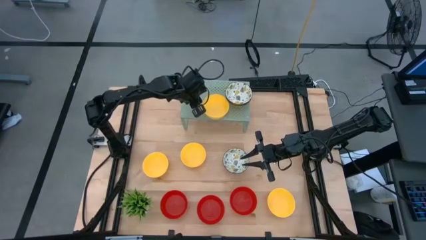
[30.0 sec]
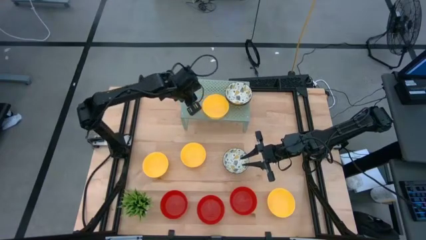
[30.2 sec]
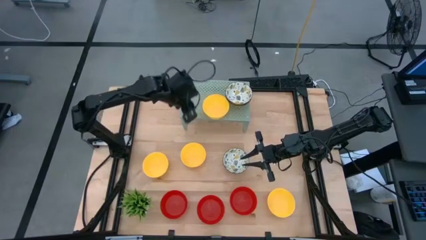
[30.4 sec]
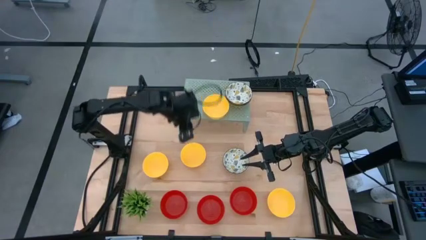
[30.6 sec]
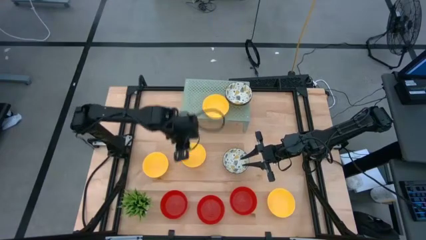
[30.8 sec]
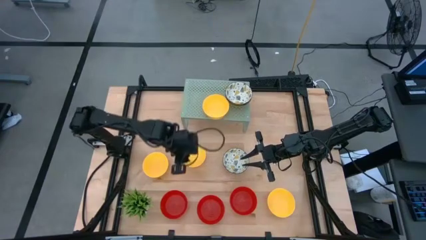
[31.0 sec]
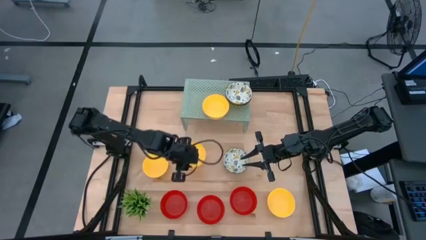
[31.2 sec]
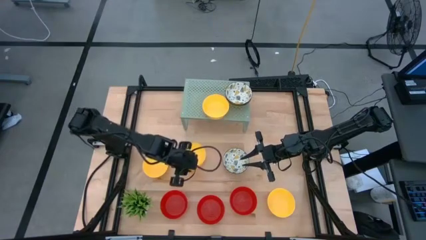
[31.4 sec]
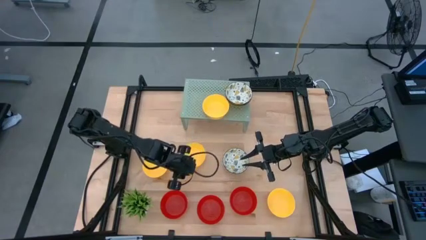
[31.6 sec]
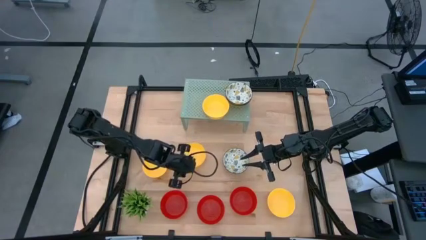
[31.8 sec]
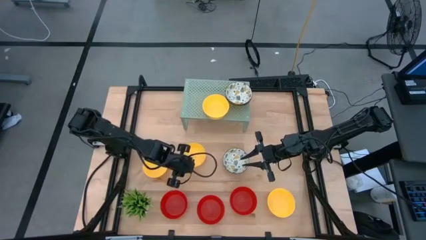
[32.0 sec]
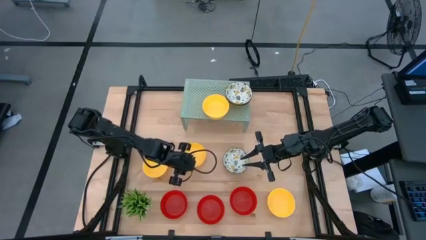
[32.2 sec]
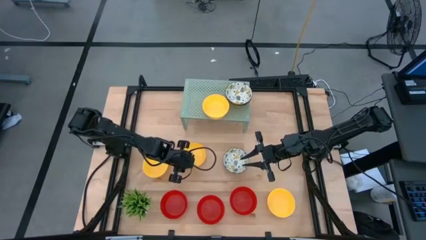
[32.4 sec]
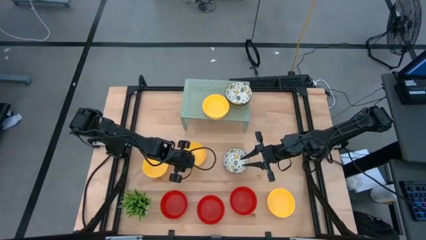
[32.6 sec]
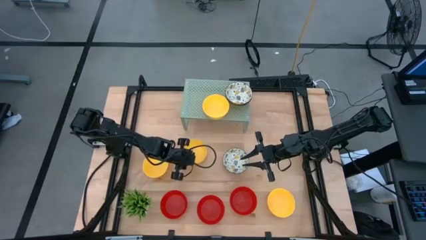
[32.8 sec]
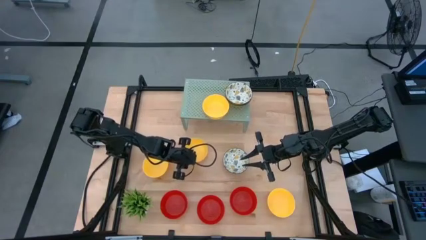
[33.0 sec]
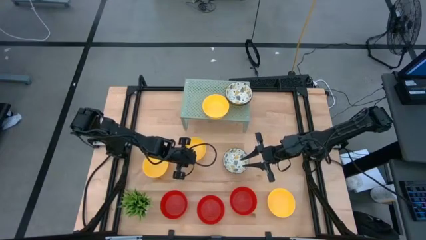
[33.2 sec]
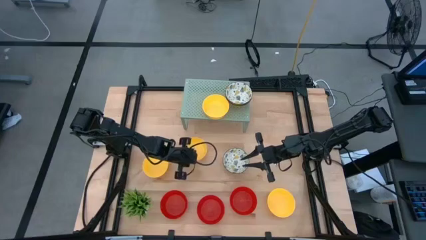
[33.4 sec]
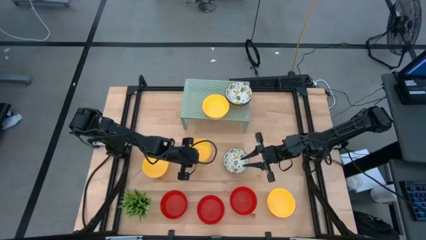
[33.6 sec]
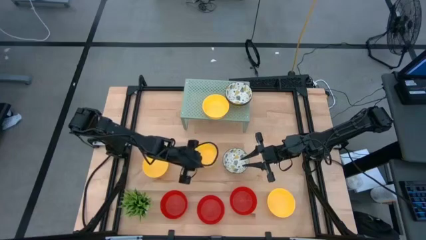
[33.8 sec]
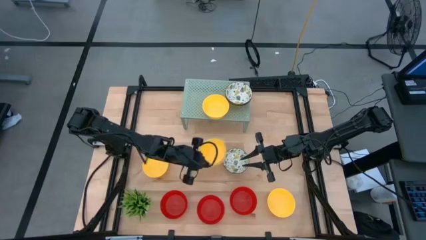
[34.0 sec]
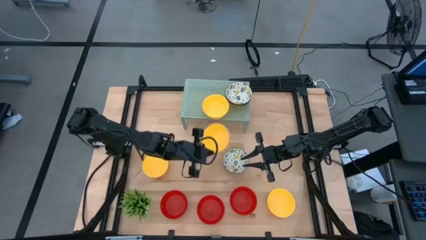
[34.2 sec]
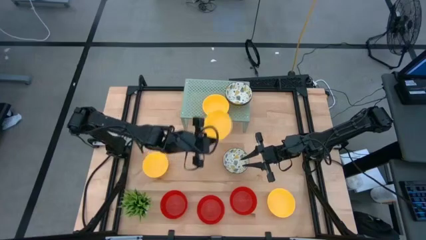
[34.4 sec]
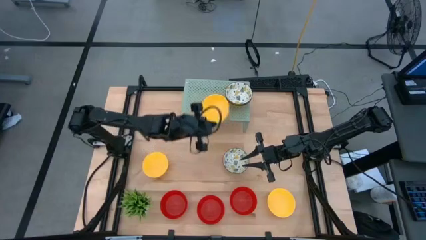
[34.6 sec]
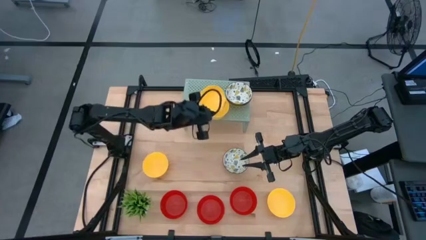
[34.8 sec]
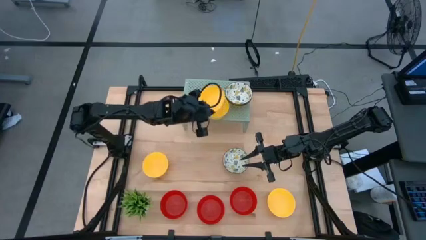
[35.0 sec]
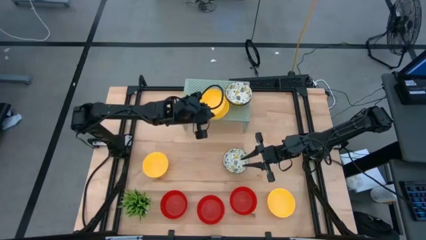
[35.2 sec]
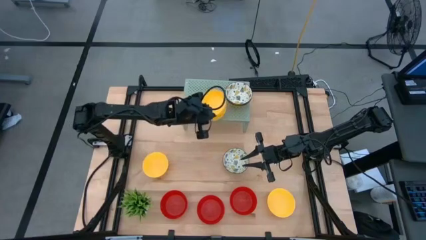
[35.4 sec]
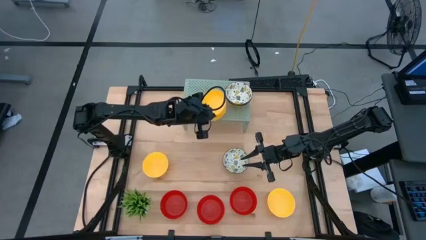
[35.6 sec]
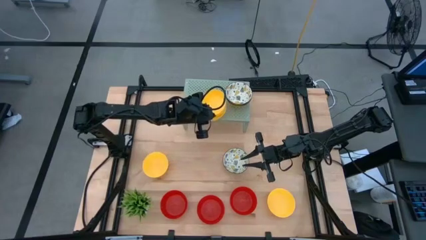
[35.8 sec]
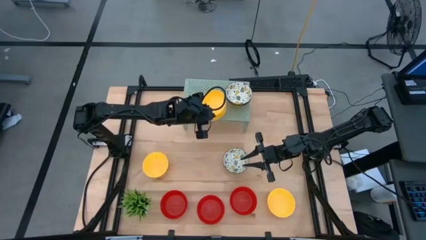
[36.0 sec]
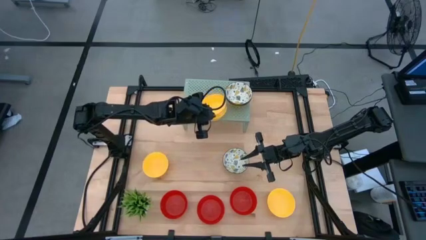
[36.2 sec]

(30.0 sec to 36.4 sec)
Task: Pick & Place Mini bowls
Stack the yellow bowl on the yellow bowl on the shelf

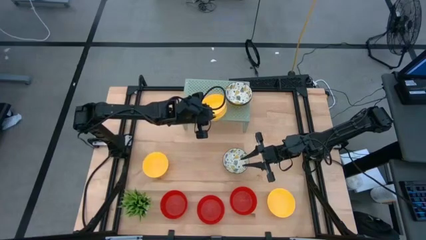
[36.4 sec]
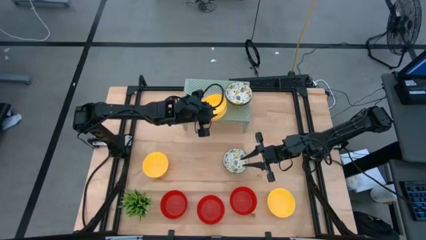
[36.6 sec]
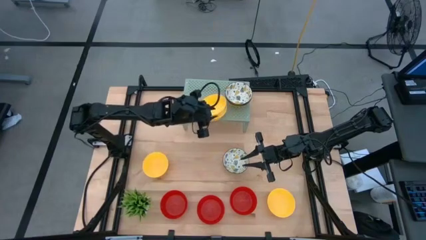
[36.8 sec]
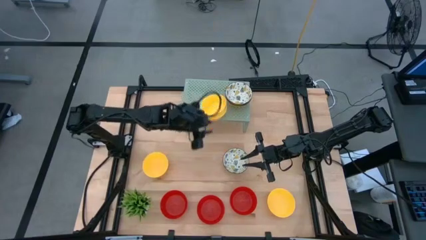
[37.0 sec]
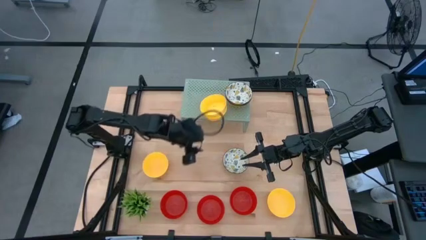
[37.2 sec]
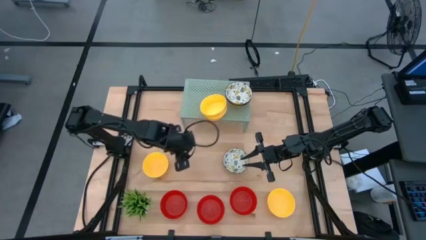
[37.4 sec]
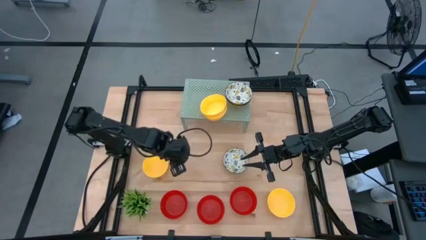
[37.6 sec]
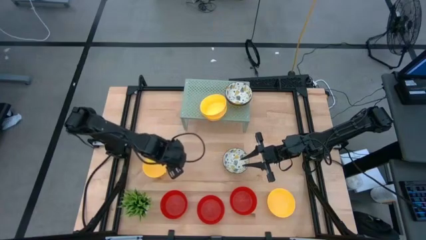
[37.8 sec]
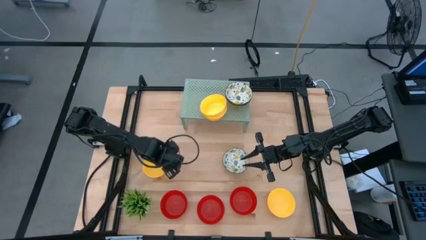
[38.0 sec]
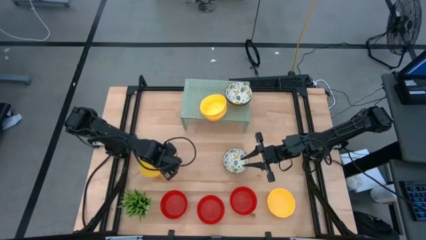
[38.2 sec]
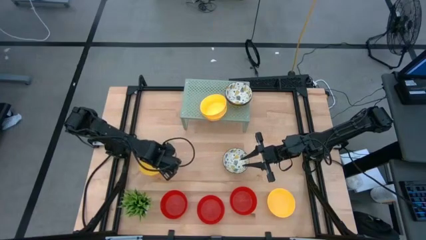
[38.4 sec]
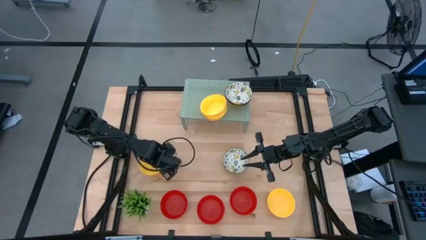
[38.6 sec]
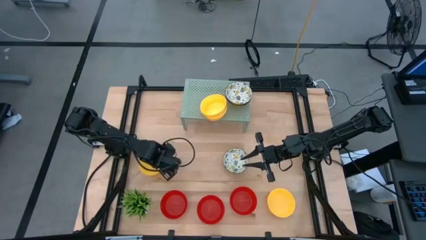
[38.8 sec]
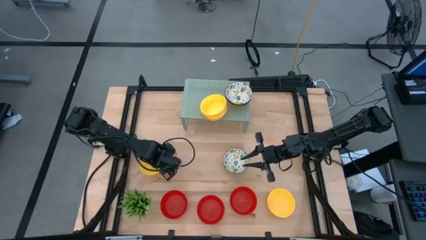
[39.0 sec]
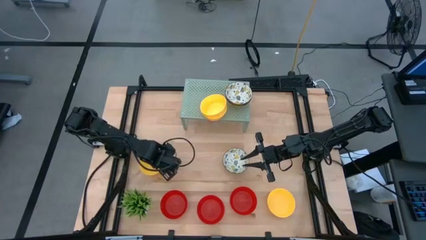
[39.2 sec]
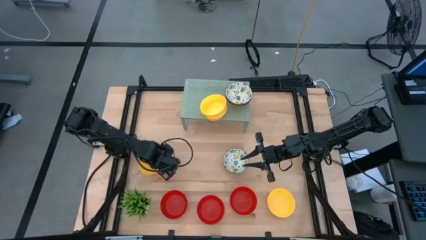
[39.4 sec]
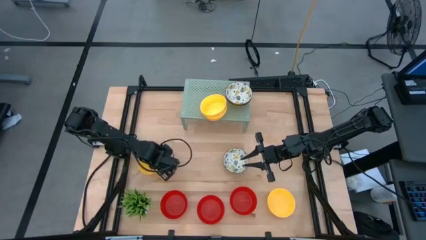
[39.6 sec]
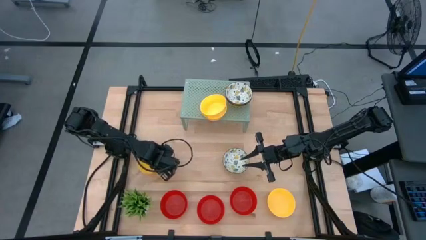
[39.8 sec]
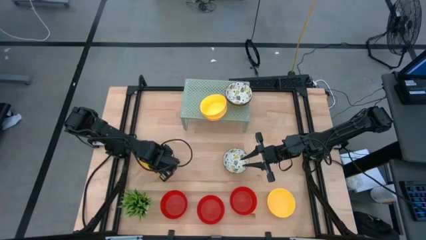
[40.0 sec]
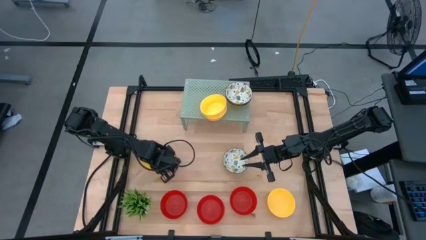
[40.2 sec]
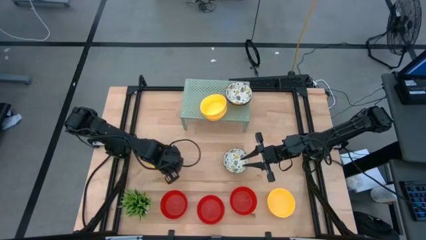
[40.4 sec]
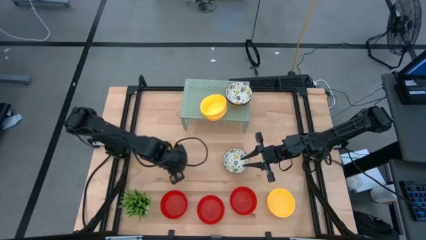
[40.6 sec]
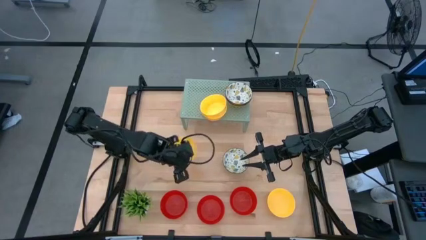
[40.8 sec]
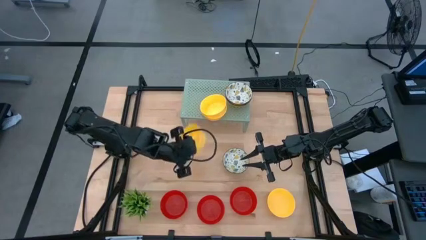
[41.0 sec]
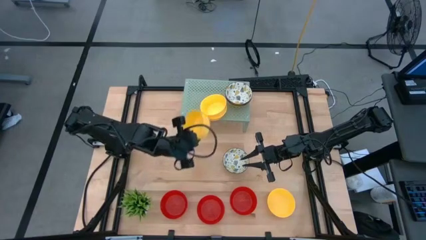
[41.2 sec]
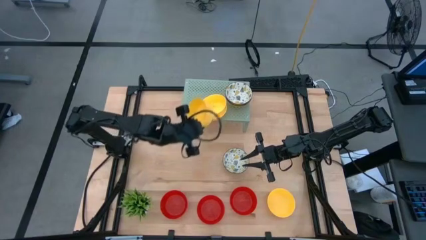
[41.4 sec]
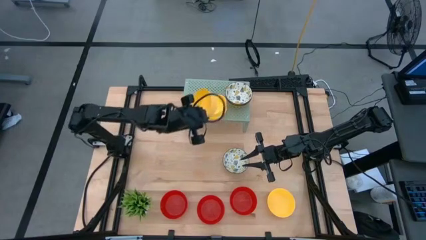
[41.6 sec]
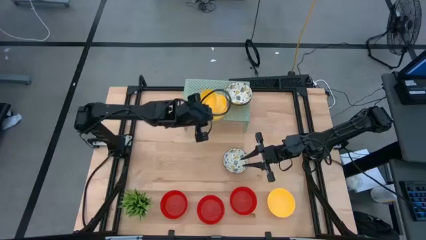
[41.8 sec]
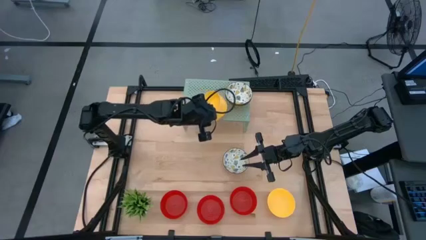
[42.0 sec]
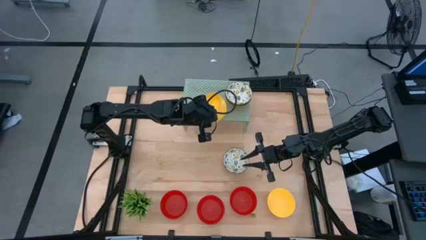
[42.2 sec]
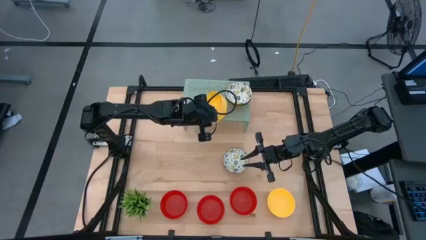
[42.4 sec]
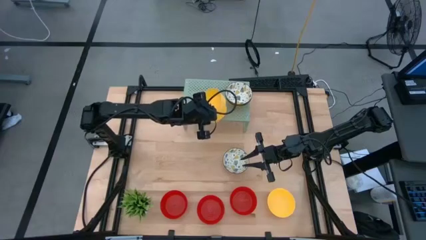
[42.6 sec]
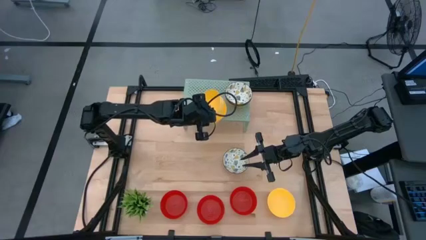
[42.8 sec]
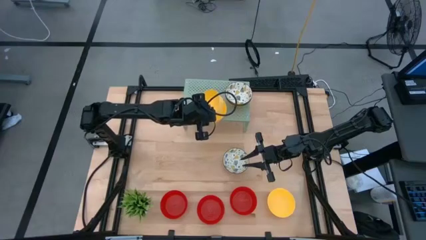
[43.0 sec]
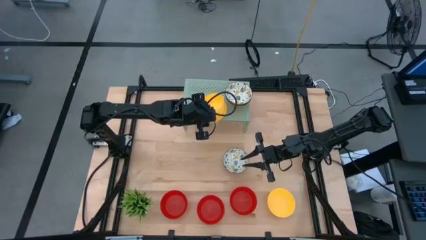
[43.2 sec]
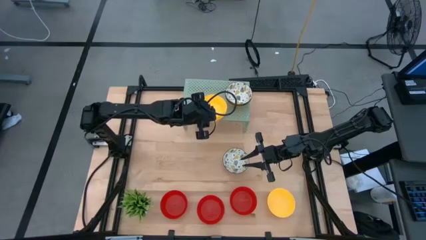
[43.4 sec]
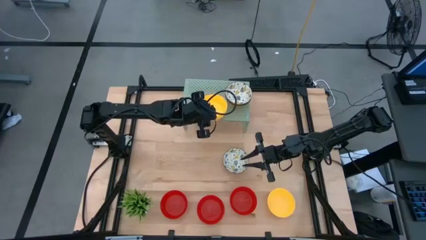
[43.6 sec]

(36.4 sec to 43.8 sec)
Stack the yellow bowl on the yellow bowl on the shelf

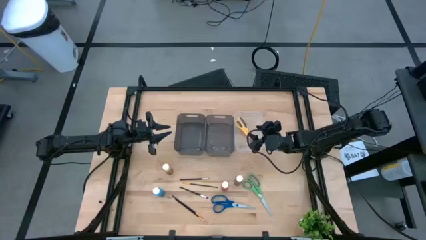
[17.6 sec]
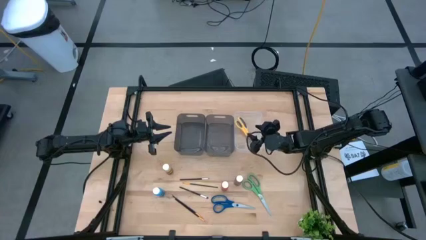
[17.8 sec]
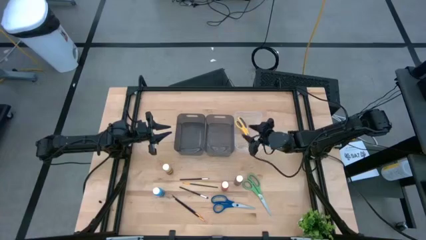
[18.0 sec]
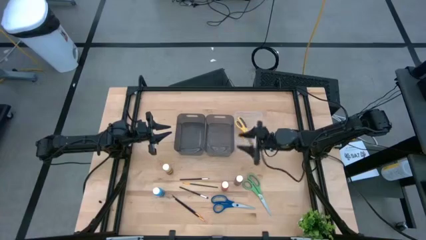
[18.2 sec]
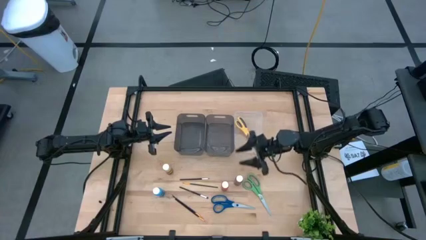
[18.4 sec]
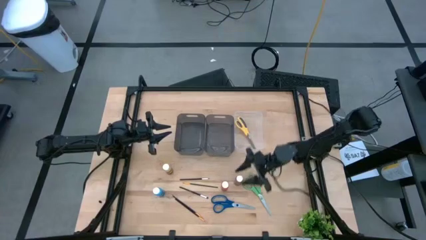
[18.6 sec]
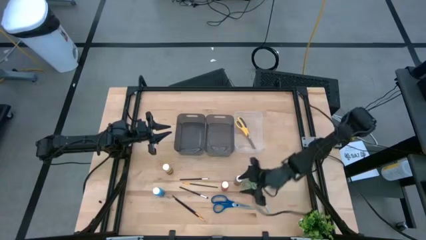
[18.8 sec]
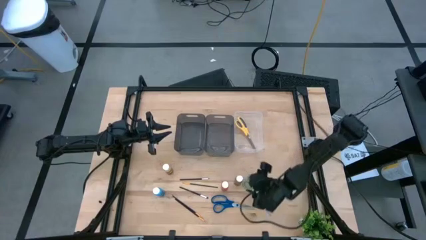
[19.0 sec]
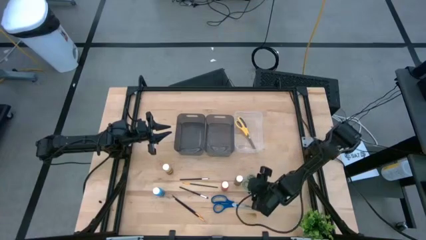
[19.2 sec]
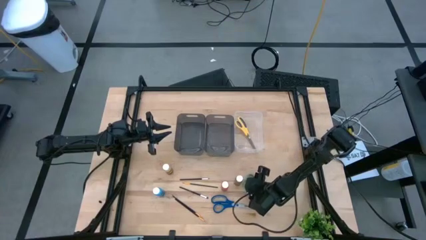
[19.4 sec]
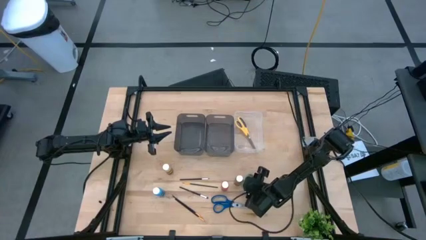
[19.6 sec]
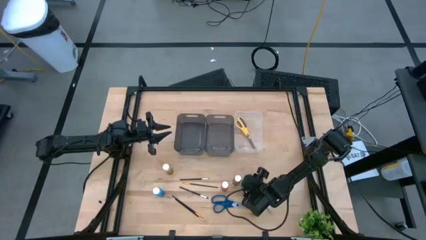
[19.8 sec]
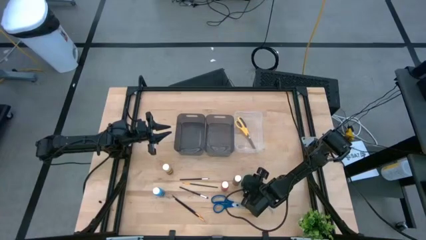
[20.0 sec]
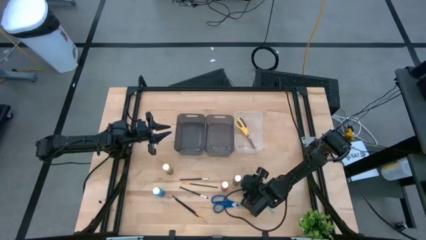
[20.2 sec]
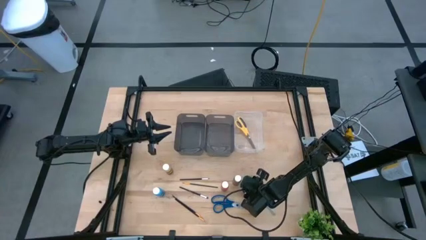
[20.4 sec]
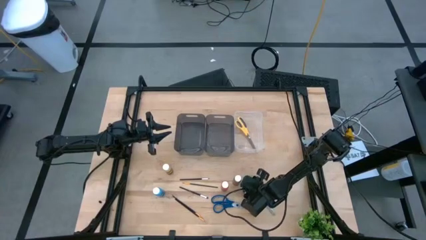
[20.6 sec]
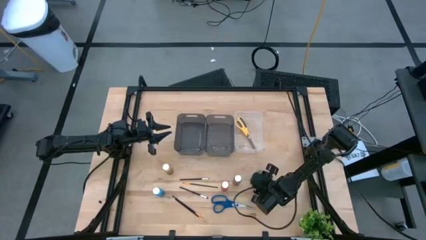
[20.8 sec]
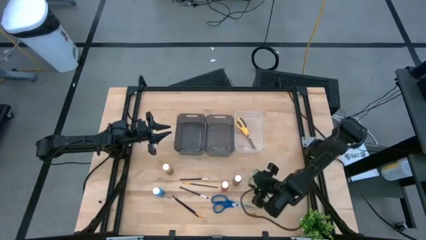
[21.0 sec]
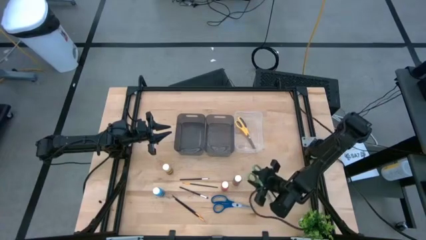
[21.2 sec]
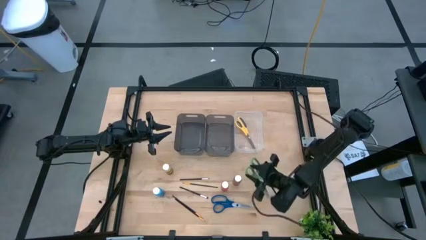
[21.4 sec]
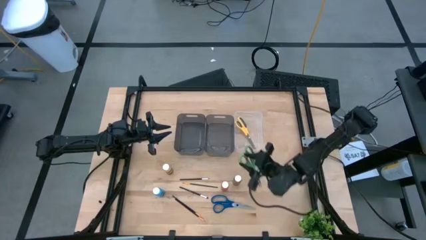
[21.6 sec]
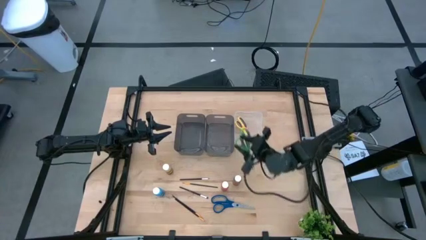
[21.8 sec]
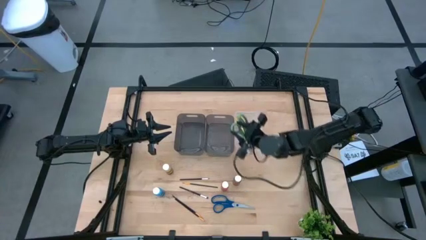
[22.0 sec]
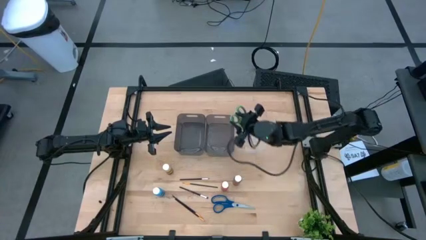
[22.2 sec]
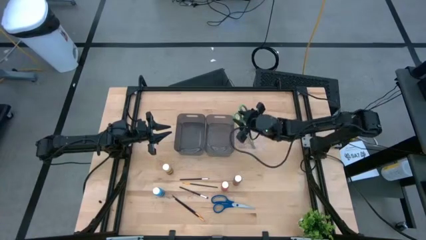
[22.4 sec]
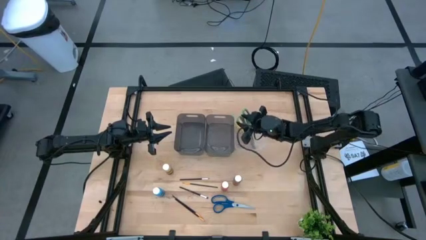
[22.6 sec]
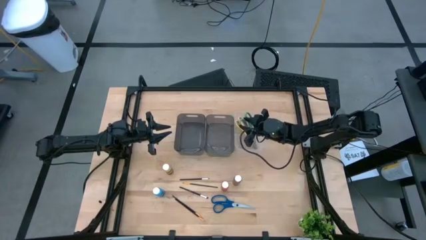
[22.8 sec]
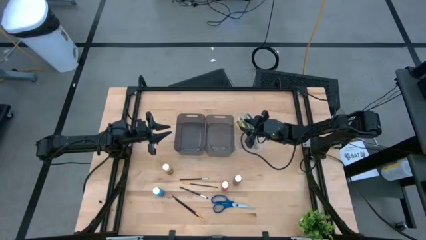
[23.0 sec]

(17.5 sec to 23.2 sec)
Task: Pick & Place Paint Supplies
Put the green scissors into the transparent bin
